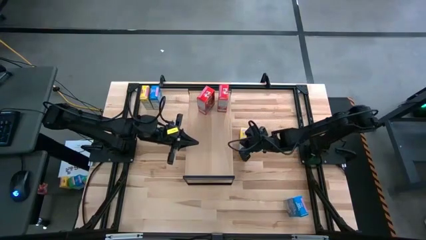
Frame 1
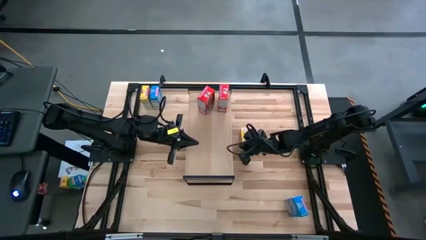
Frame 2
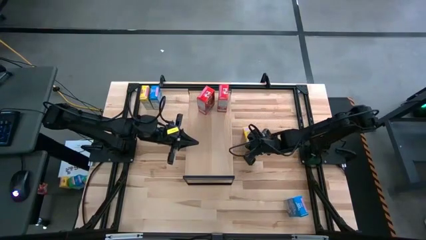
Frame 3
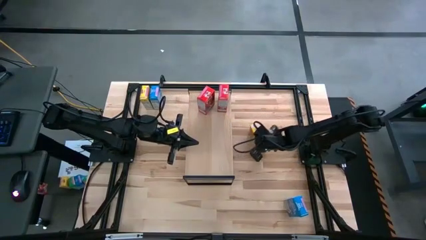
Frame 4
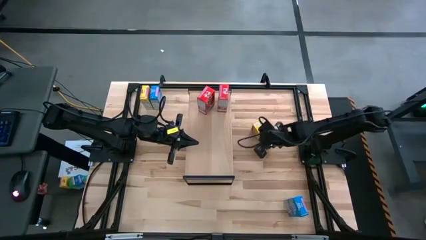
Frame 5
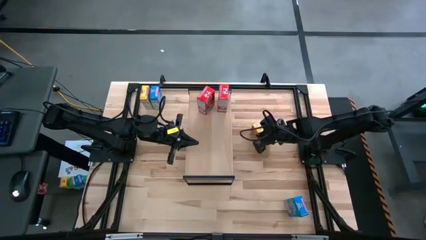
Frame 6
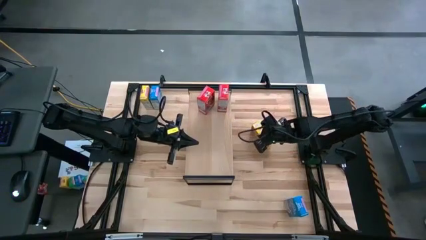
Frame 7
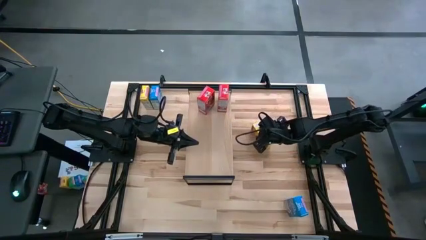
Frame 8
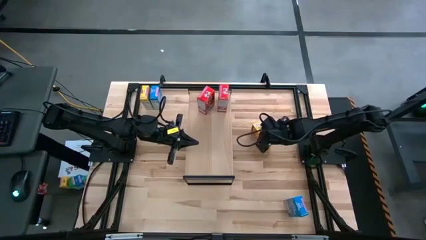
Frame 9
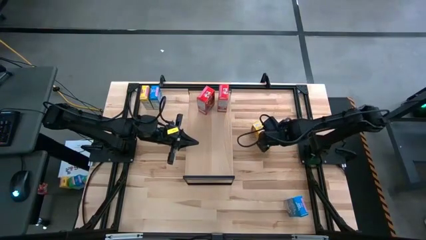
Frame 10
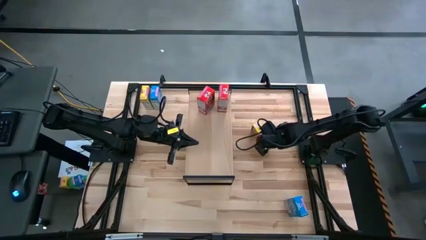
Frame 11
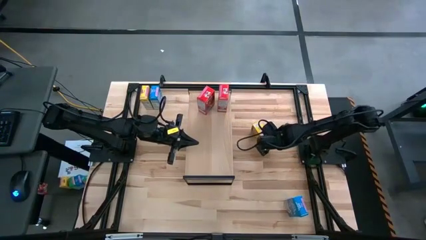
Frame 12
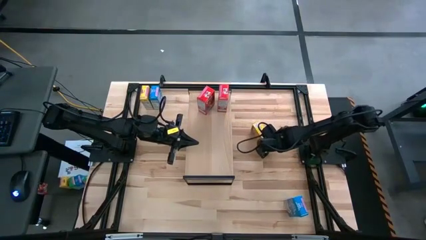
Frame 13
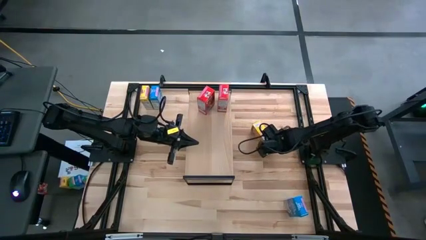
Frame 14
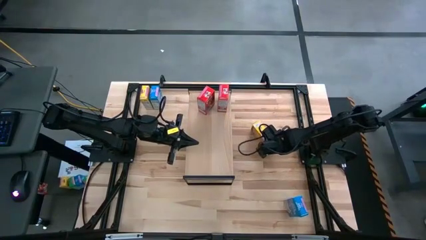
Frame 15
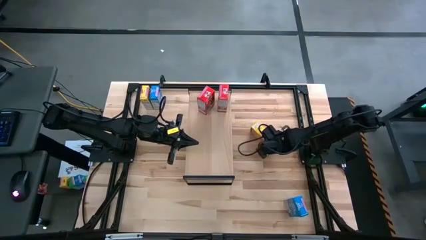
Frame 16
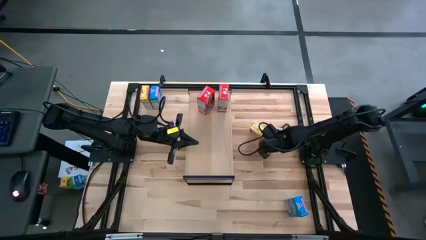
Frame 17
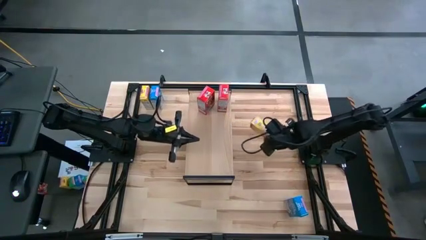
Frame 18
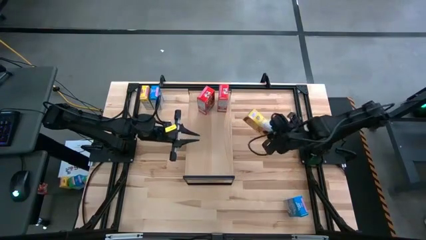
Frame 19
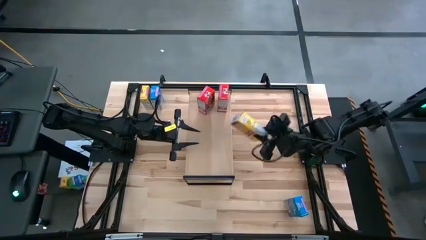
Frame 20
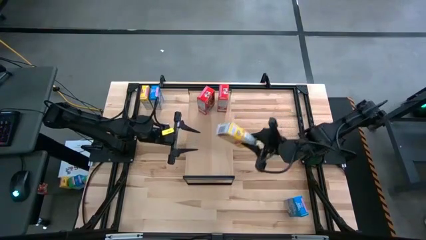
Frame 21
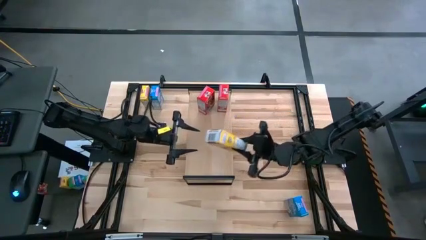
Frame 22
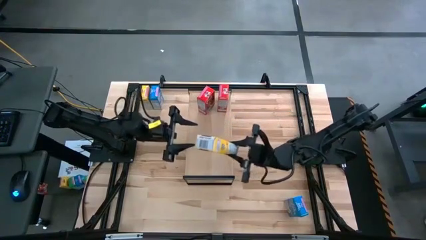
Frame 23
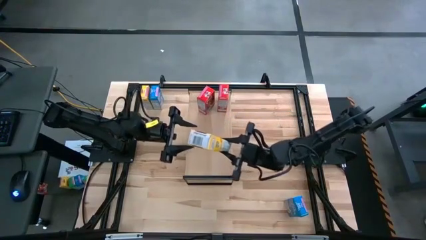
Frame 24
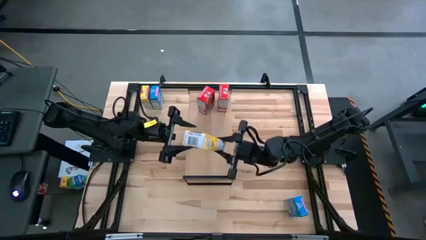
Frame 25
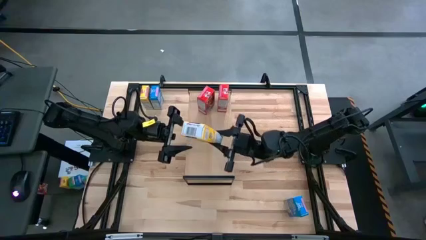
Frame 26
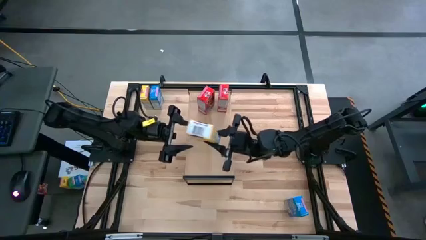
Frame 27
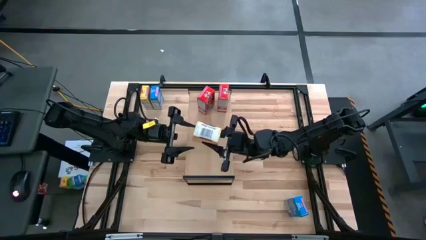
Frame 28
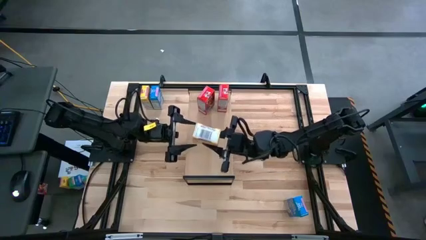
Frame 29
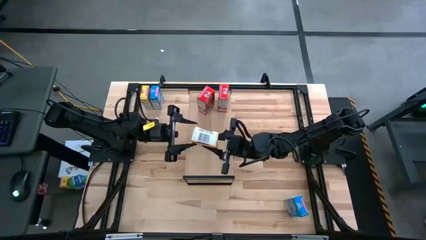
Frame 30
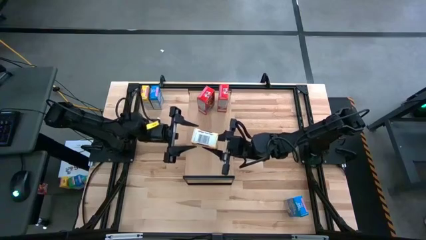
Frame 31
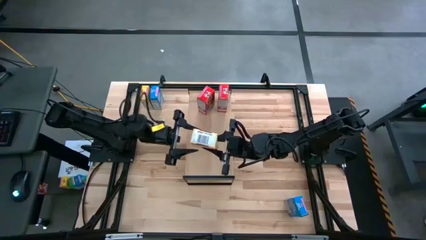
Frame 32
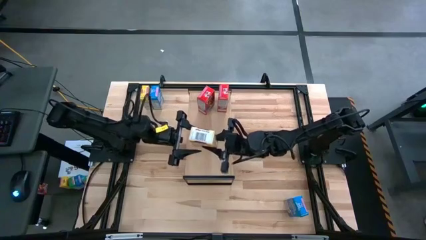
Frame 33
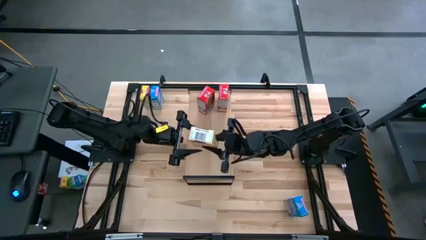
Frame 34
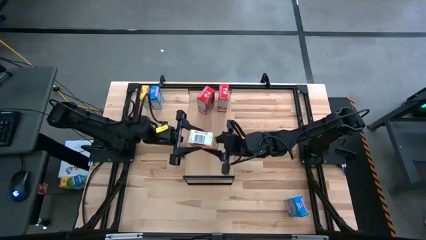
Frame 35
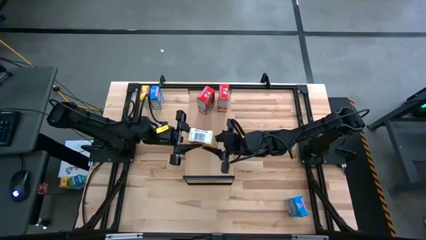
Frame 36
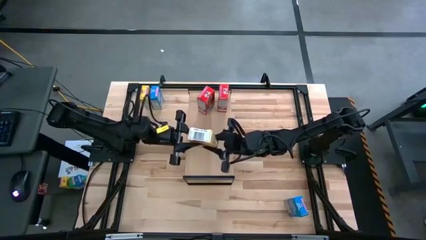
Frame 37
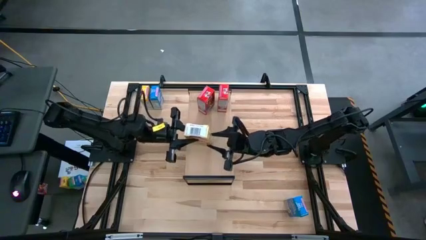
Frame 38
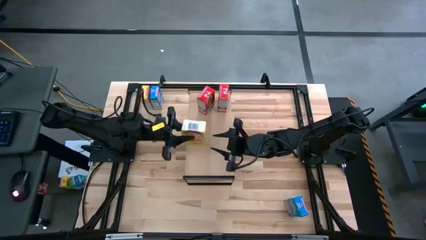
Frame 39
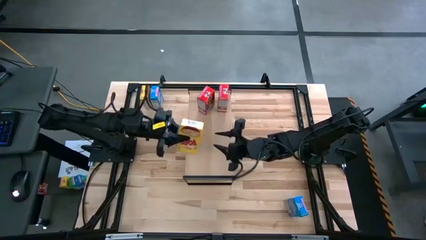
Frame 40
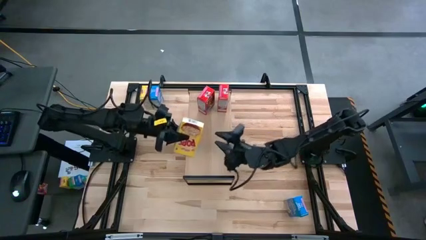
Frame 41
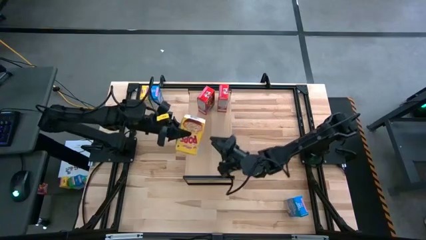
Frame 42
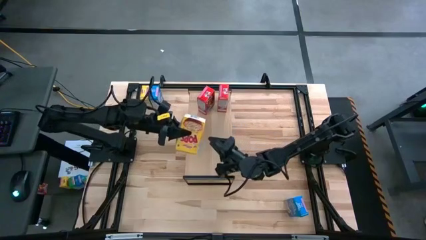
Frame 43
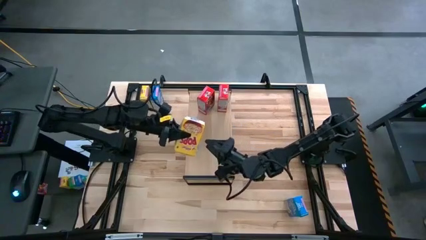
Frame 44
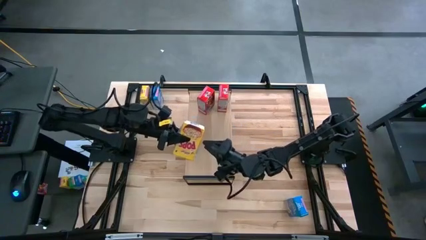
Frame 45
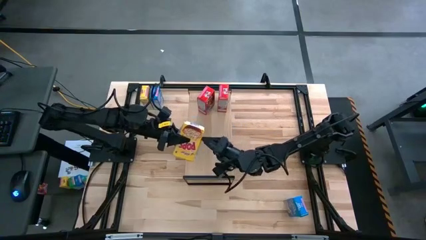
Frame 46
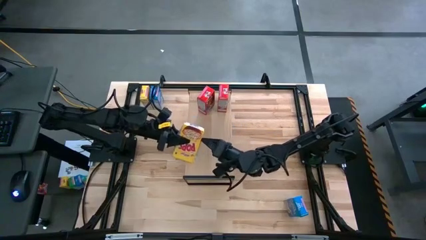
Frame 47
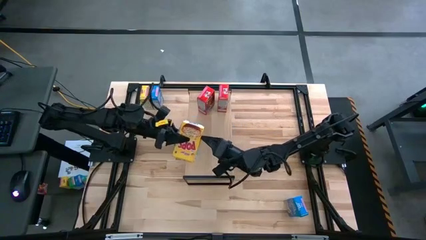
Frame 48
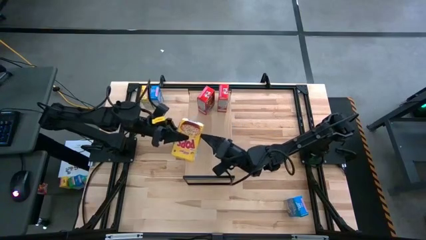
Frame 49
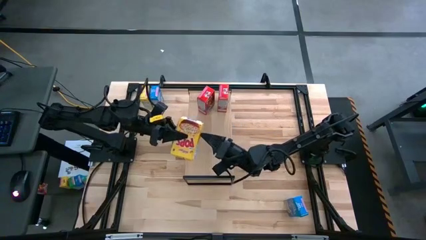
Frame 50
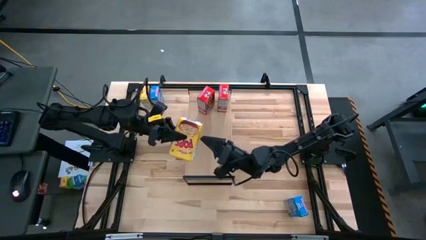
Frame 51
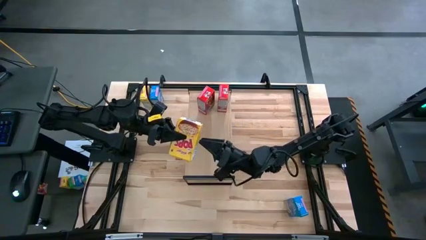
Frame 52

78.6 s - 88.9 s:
Task: Stack cereal on shelf
Put the bottom yellow cereal box on the shelf
